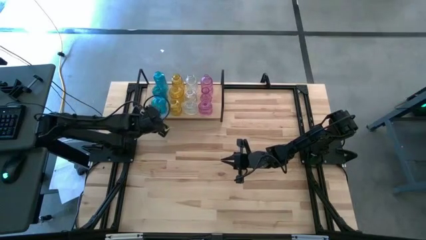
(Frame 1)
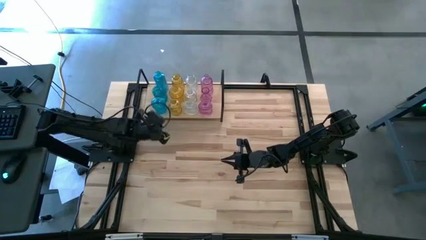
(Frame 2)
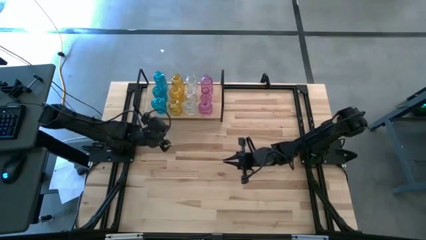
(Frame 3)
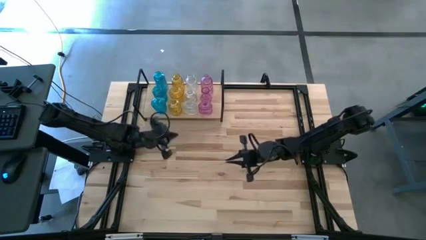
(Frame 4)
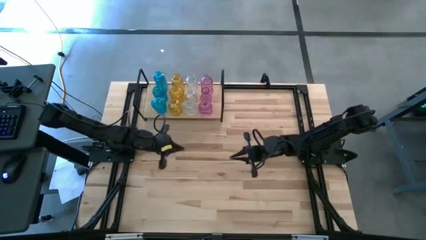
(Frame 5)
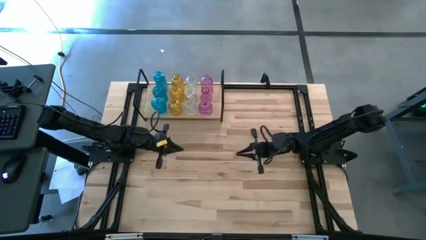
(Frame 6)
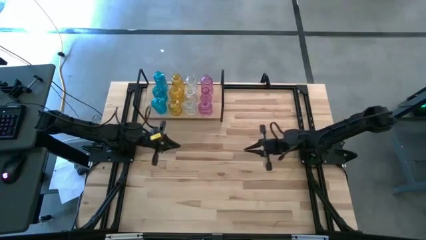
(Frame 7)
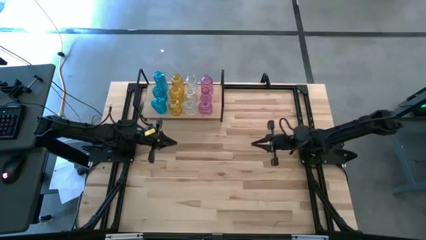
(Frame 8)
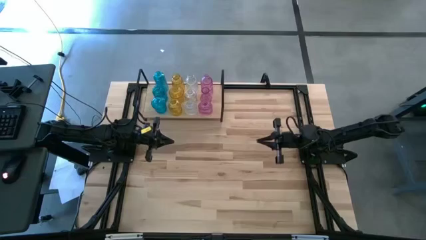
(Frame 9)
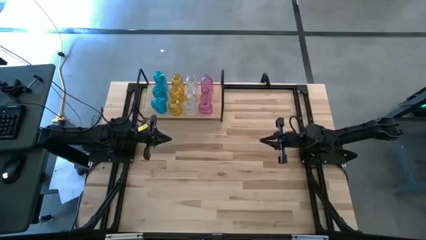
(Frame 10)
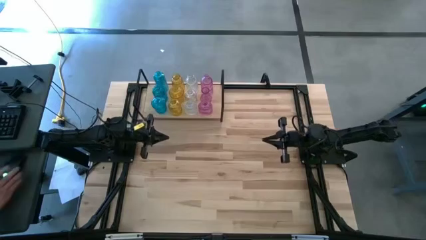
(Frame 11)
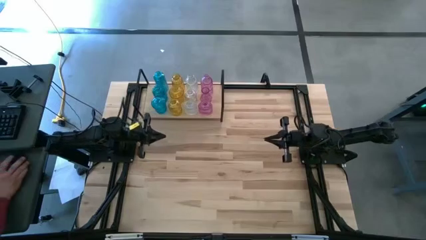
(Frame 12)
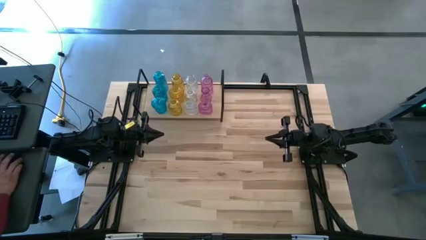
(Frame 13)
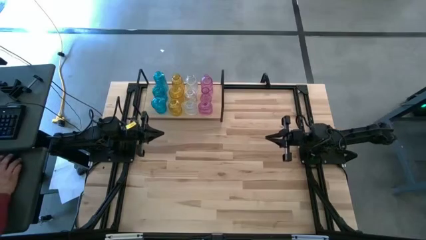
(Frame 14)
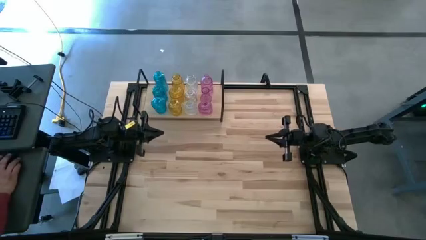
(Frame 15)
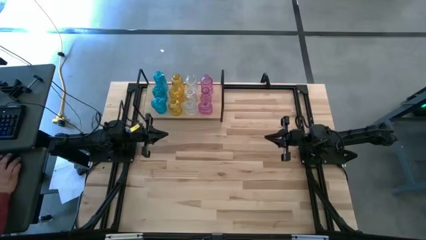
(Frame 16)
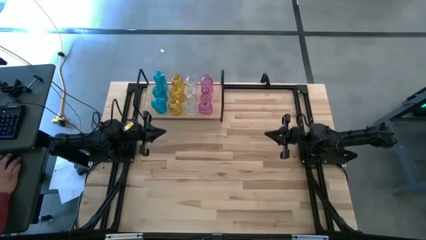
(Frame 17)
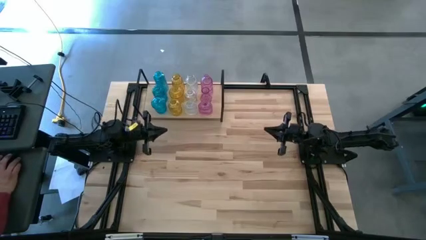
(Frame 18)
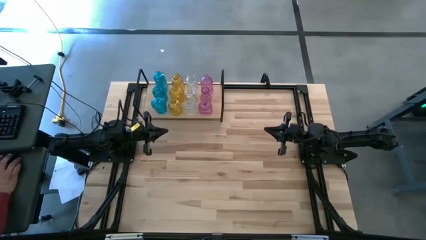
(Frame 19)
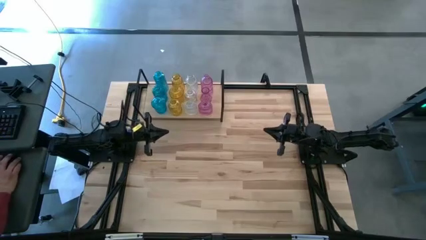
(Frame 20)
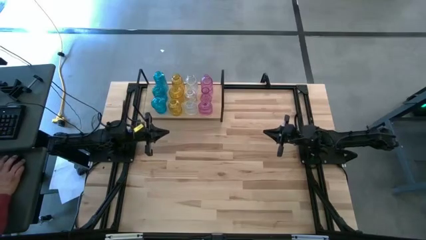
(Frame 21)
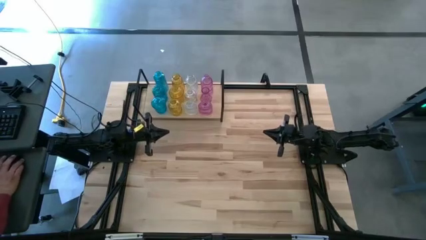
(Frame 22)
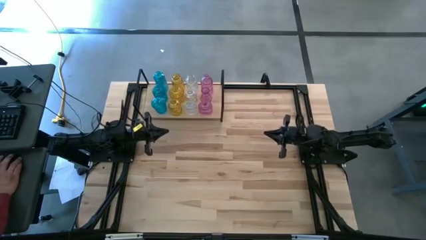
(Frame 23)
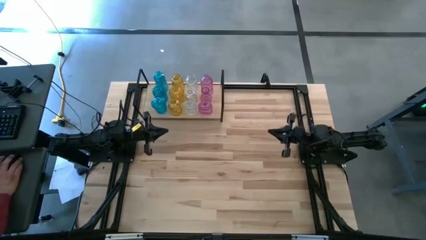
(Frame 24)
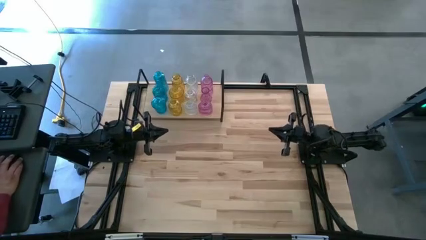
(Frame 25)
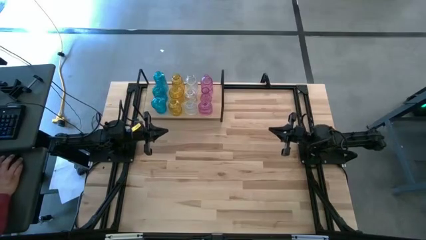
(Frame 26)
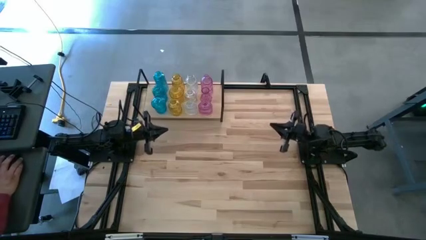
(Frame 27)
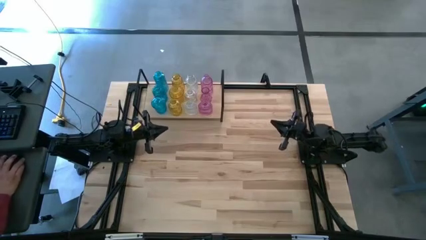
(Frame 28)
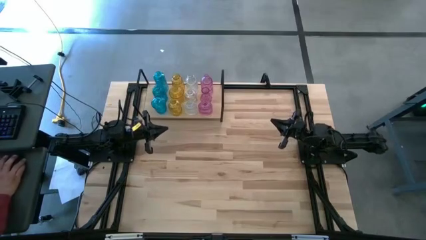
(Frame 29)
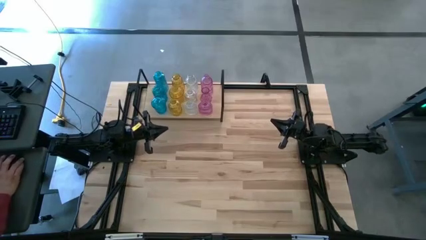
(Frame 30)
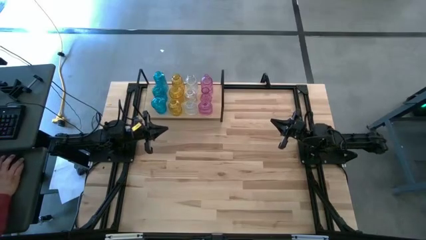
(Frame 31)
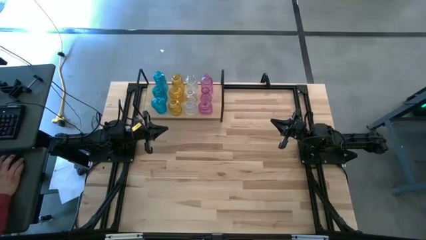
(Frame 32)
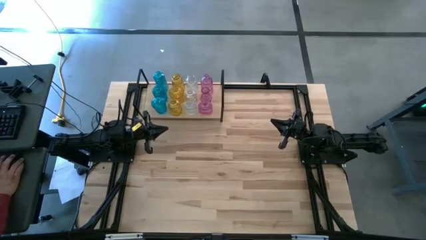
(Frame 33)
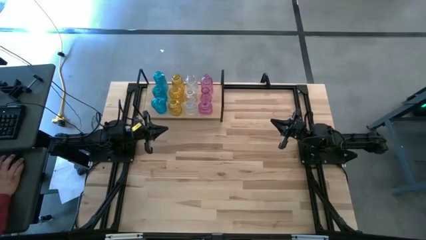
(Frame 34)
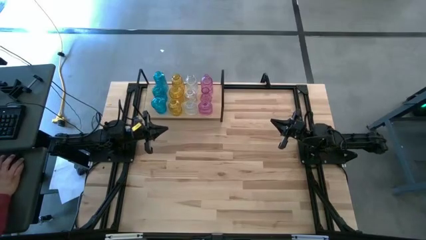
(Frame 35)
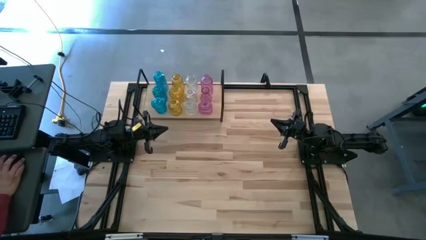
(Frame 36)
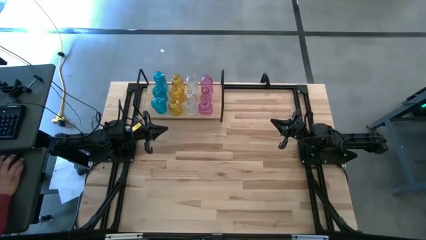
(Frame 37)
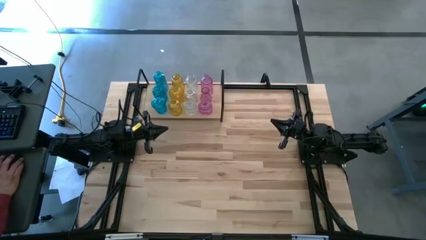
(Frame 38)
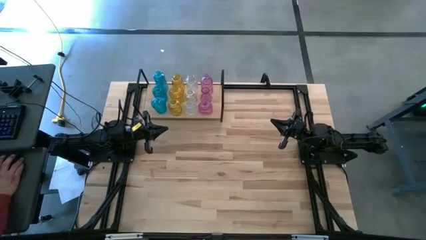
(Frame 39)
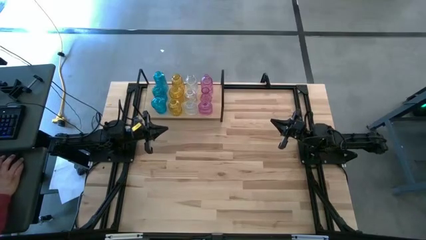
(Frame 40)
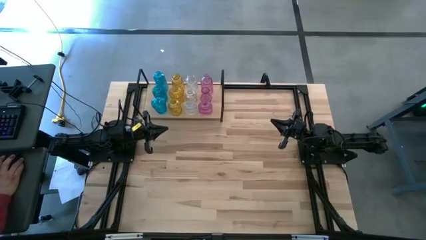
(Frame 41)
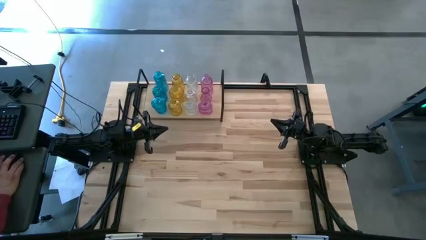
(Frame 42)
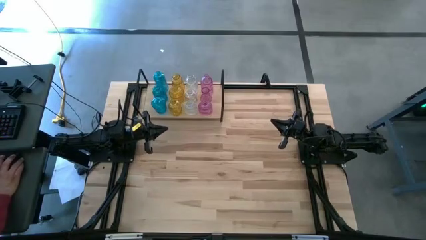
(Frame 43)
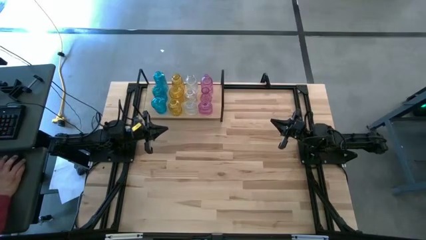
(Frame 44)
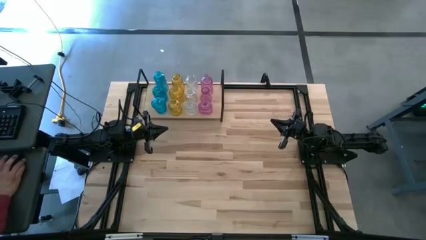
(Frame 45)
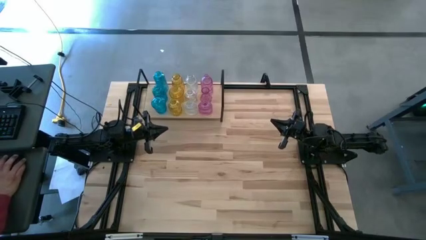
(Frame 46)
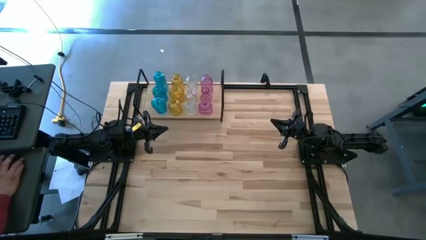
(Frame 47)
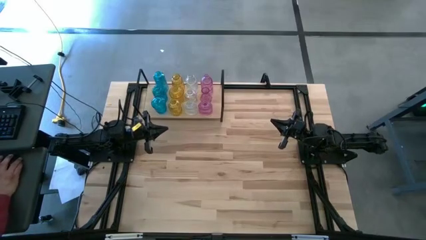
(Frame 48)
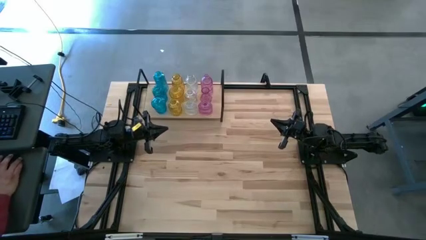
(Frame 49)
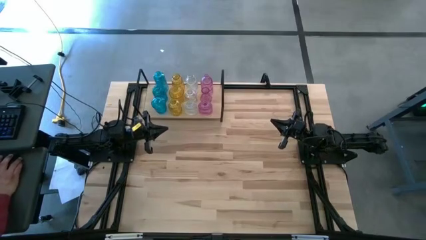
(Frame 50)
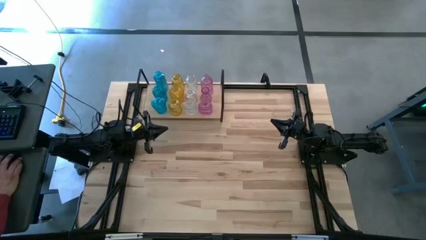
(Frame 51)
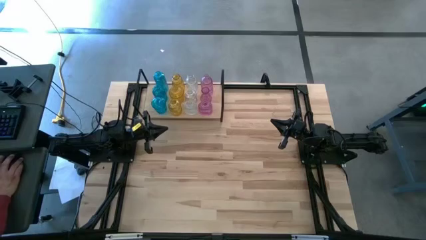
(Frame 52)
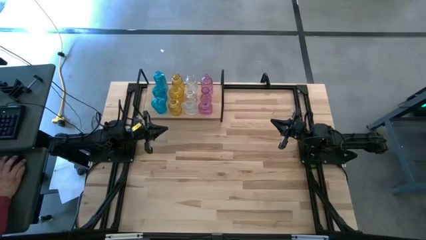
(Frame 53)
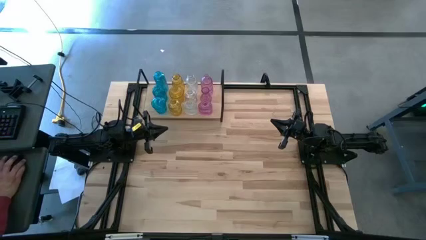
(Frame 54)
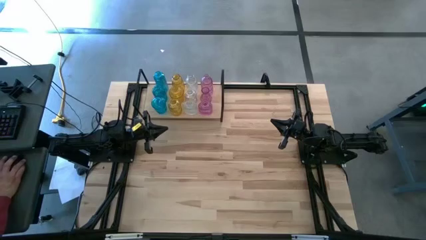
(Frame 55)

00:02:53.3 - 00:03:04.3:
Task: sort vases onto shelf
Return to Home Position

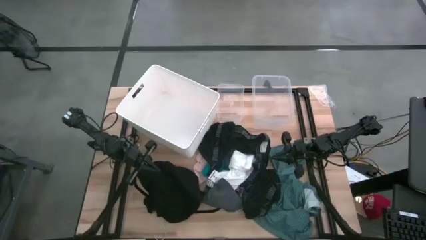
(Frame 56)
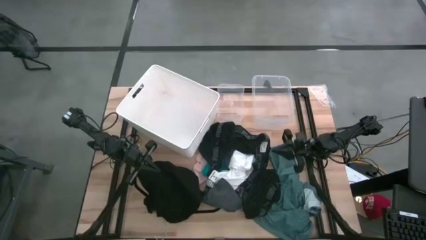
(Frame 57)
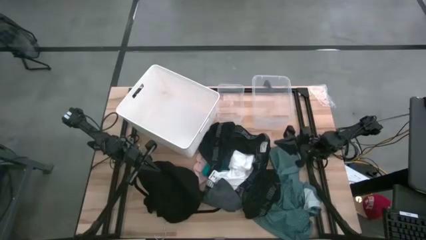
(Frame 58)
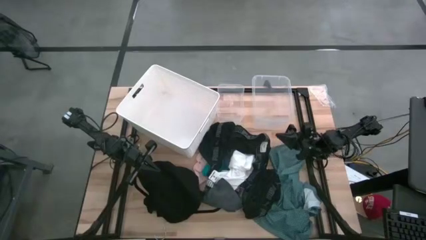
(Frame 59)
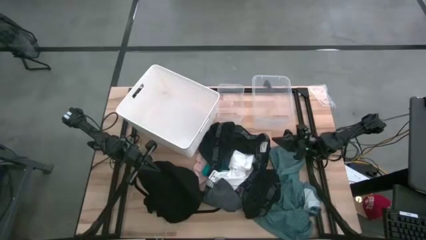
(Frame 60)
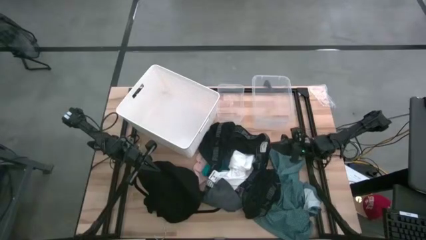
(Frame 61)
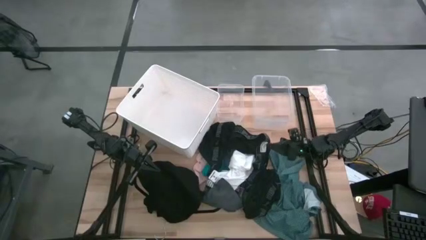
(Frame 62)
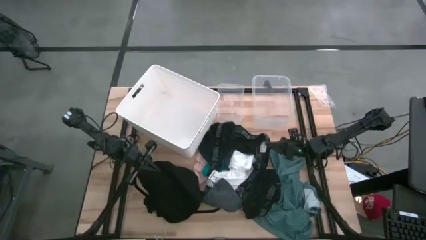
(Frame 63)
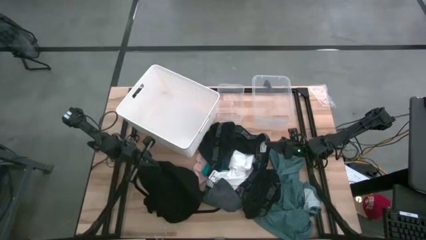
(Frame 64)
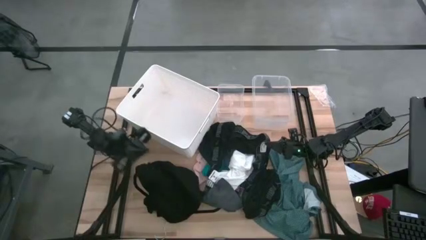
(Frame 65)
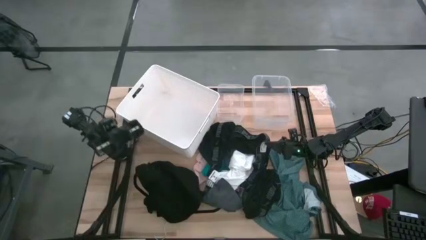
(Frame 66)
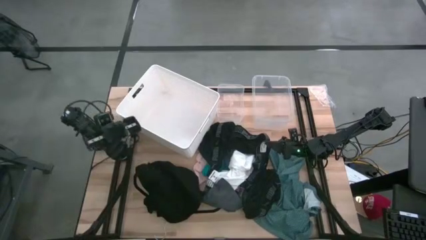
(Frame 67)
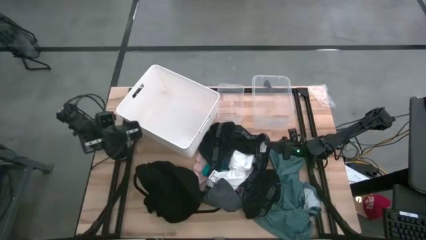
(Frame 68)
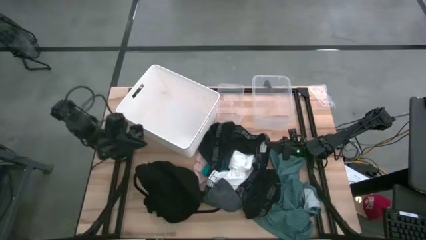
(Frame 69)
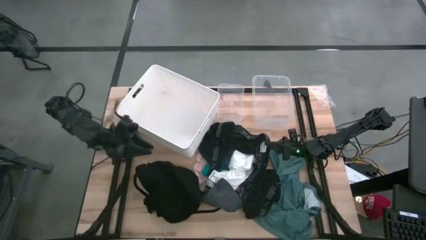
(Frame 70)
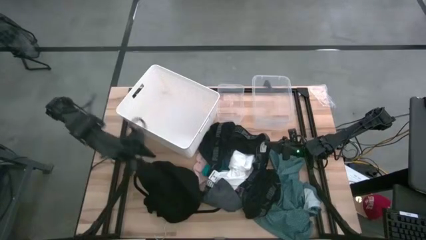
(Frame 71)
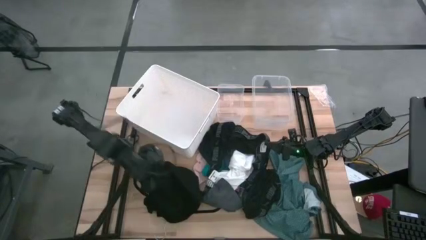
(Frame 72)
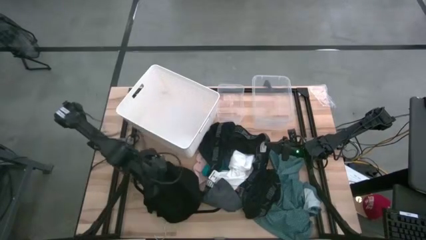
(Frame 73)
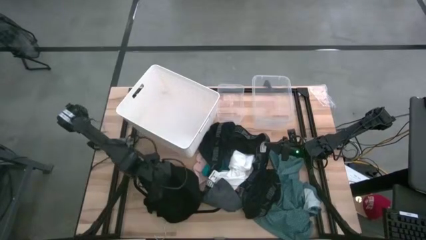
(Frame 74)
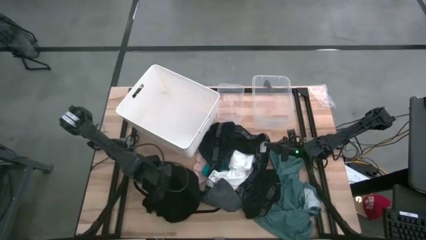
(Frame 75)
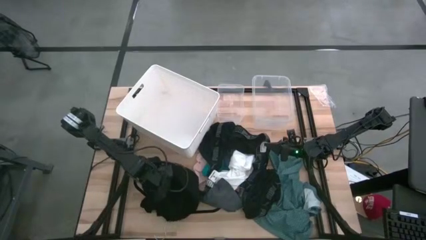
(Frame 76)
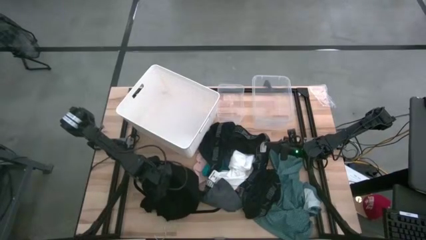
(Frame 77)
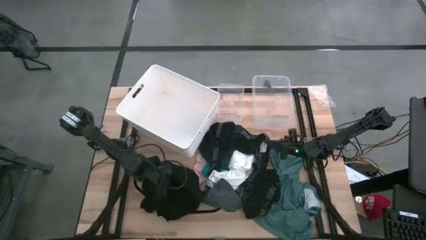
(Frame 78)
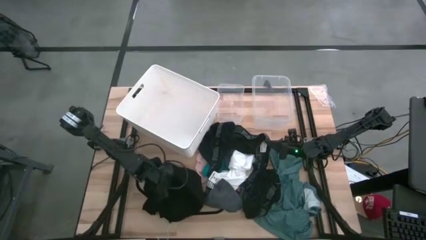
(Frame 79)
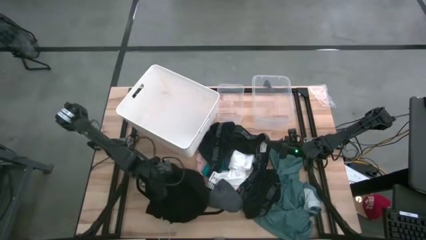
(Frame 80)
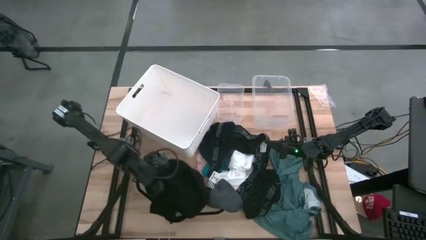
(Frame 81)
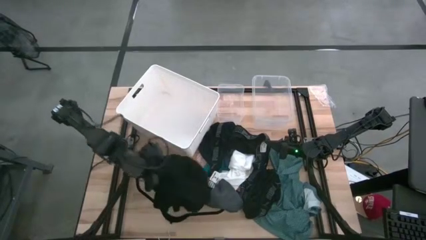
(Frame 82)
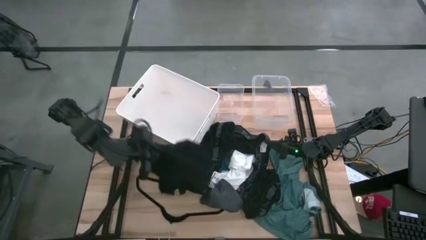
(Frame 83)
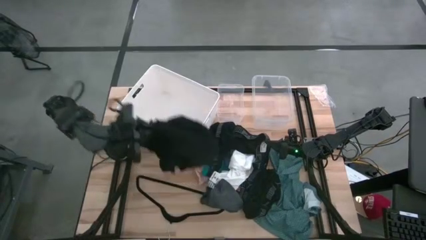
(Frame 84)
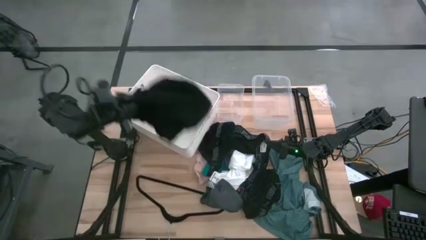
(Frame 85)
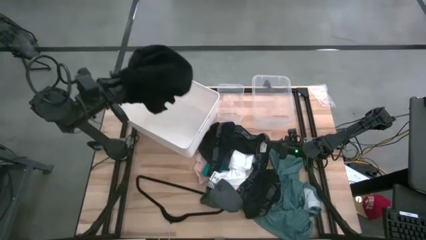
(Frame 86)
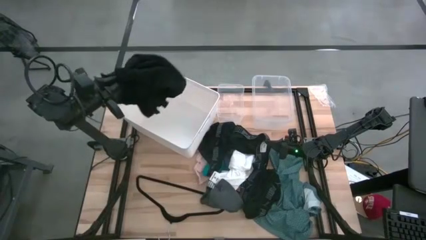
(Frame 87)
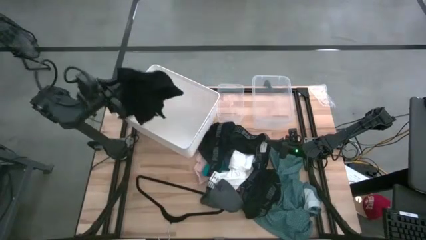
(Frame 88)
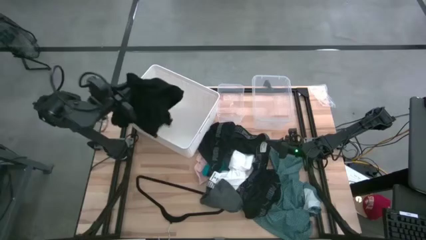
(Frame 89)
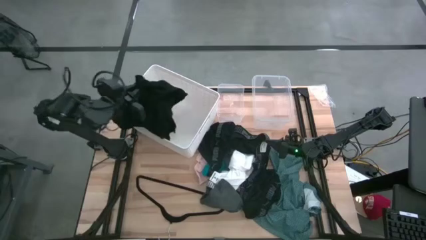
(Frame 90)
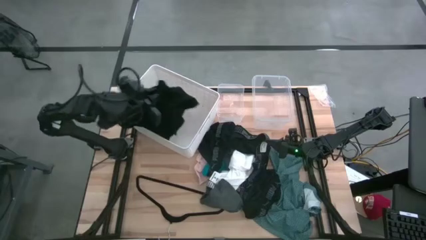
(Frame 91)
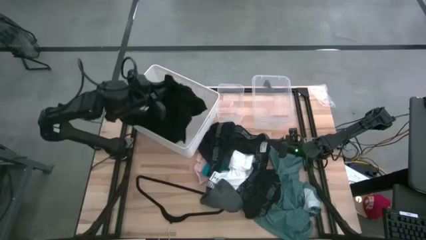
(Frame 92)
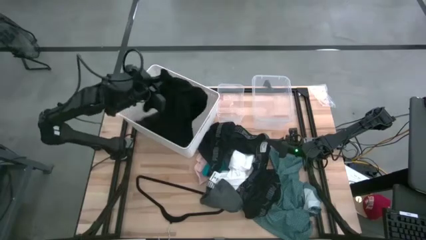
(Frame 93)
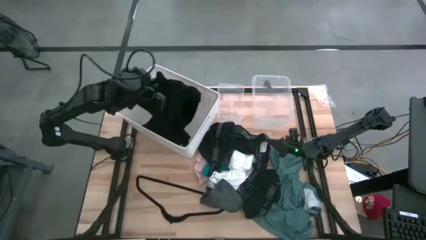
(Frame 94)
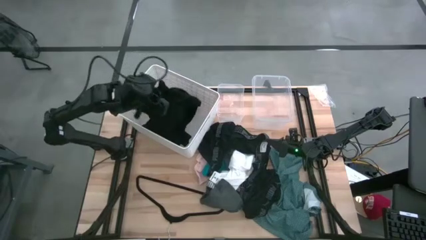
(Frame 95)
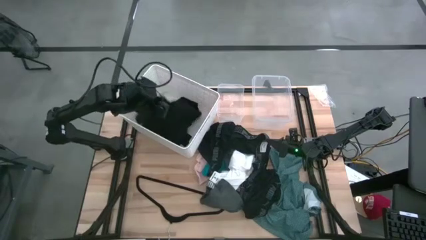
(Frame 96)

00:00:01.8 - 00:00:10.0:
Task: Pick & Place Cloths
Put the black shirt into the white bin
